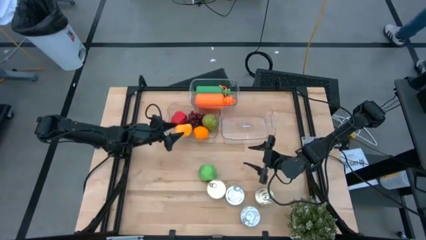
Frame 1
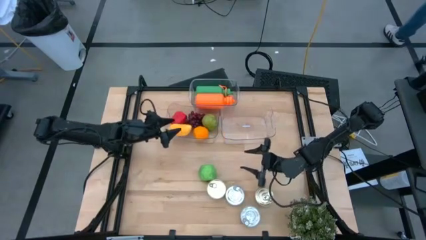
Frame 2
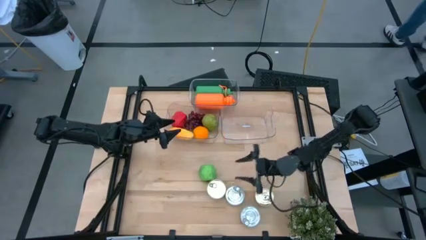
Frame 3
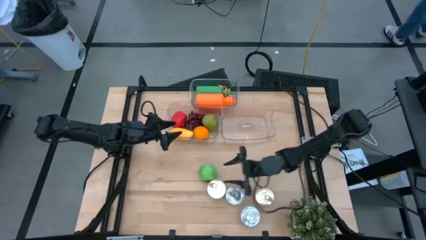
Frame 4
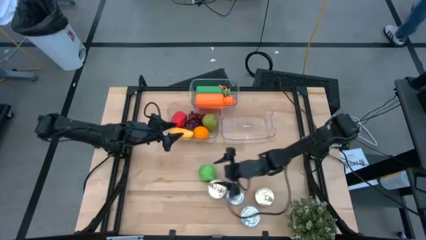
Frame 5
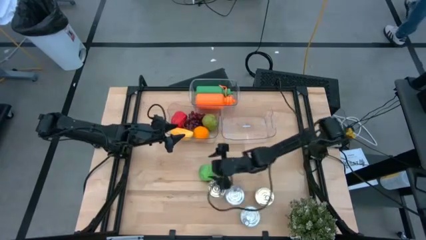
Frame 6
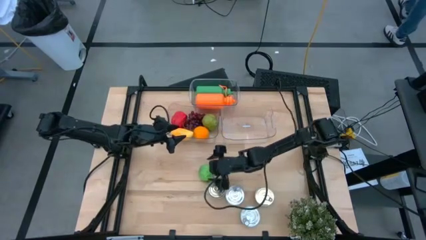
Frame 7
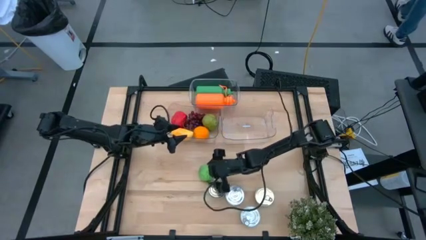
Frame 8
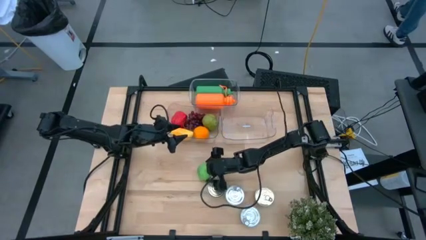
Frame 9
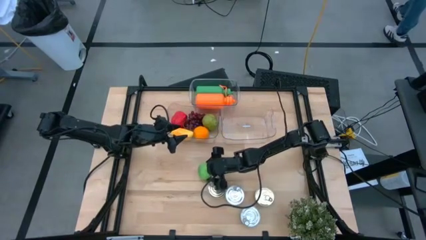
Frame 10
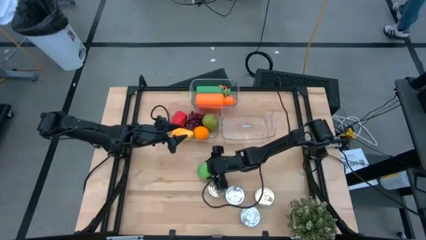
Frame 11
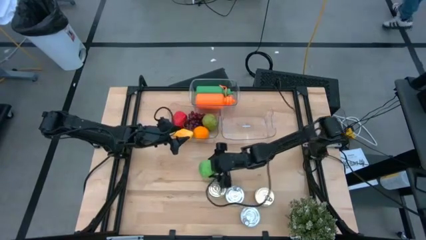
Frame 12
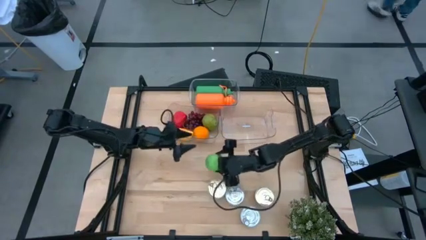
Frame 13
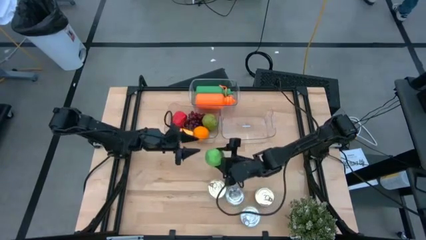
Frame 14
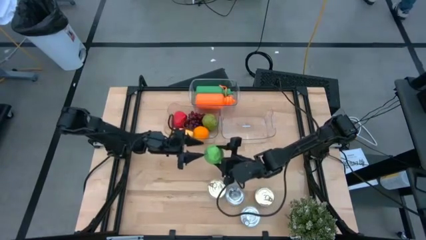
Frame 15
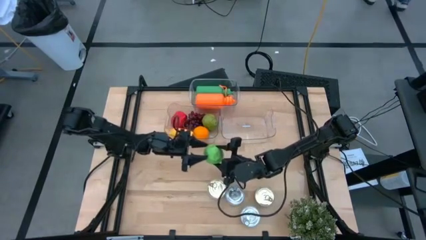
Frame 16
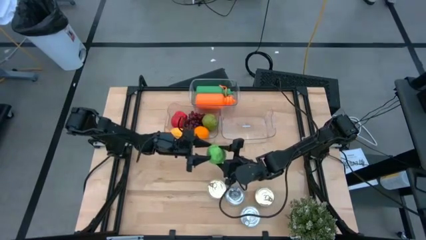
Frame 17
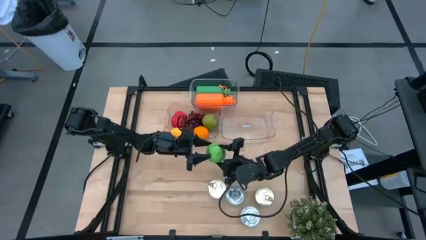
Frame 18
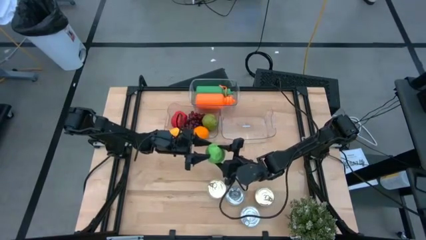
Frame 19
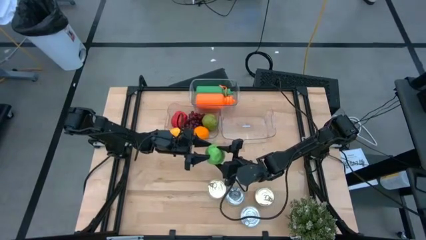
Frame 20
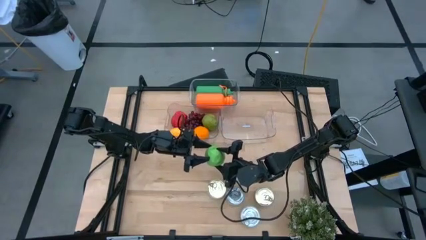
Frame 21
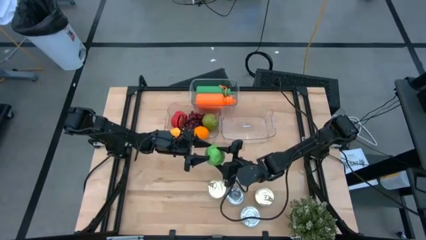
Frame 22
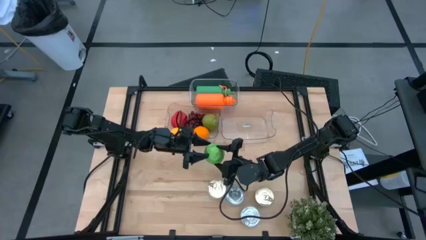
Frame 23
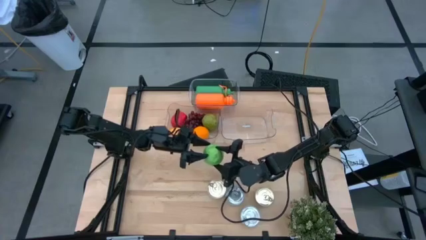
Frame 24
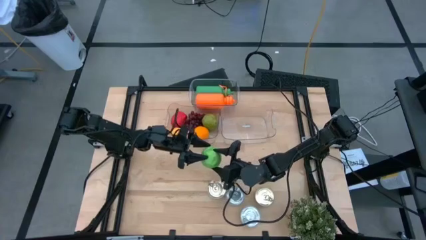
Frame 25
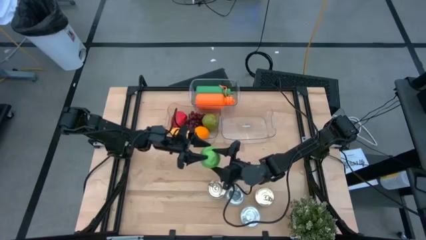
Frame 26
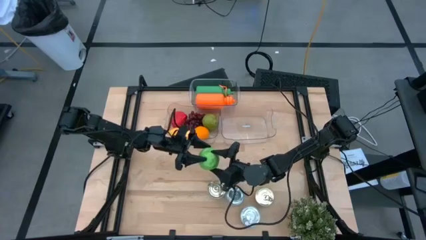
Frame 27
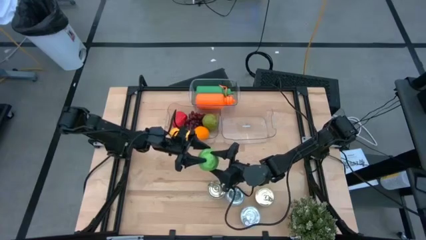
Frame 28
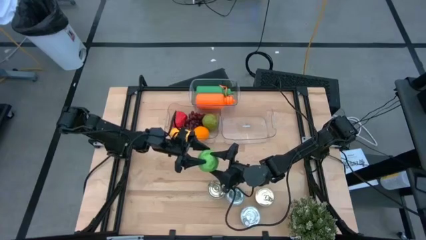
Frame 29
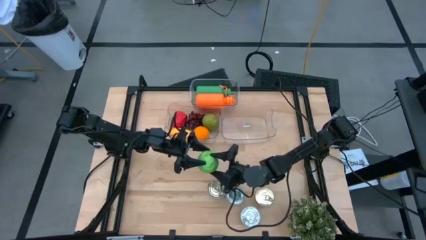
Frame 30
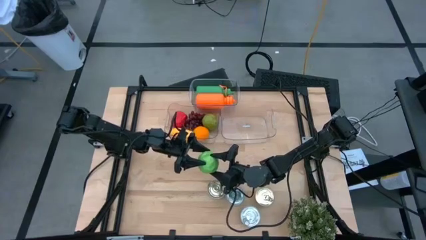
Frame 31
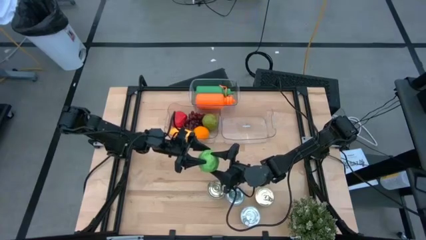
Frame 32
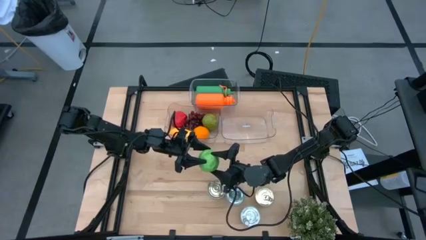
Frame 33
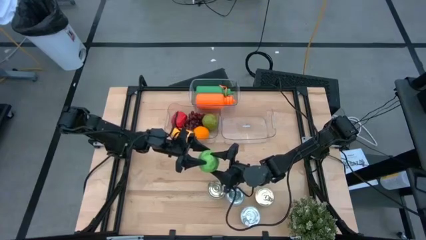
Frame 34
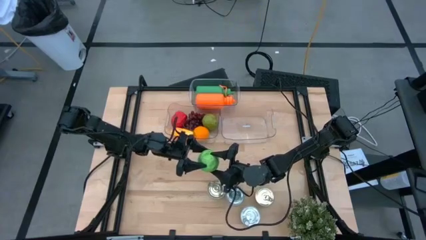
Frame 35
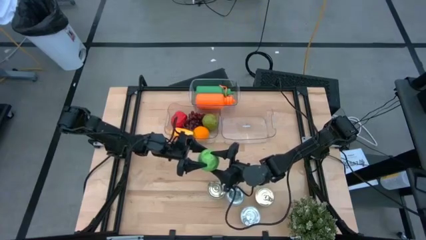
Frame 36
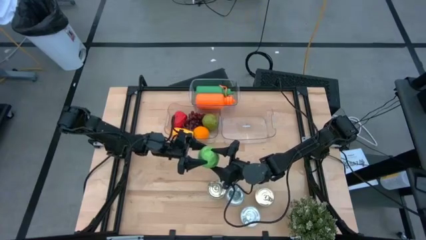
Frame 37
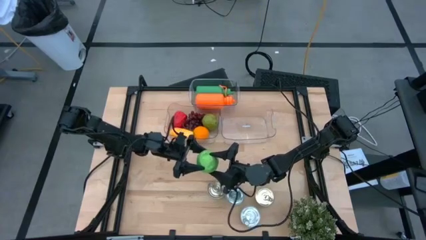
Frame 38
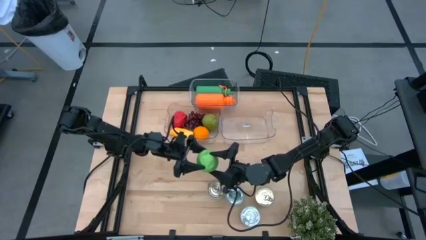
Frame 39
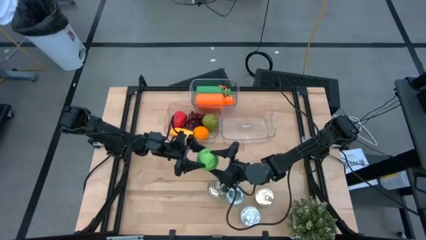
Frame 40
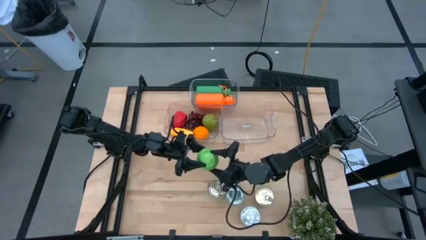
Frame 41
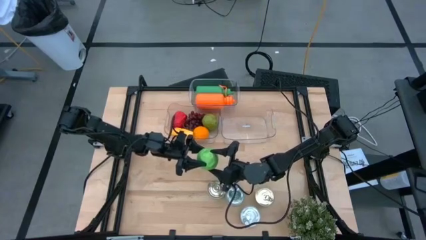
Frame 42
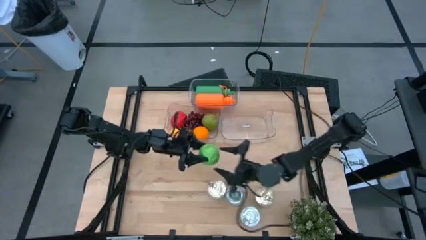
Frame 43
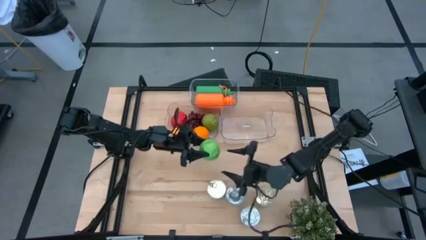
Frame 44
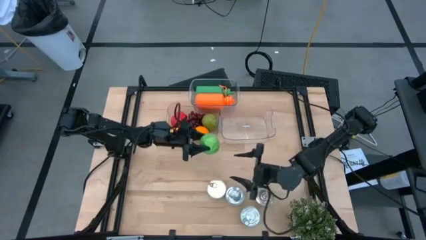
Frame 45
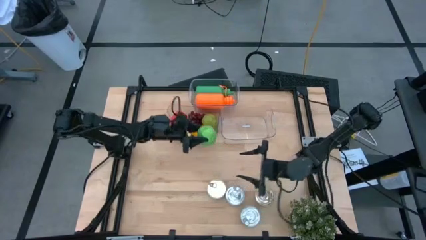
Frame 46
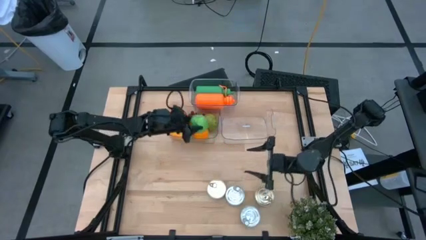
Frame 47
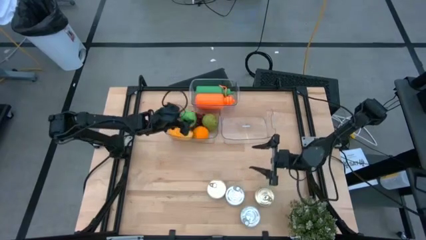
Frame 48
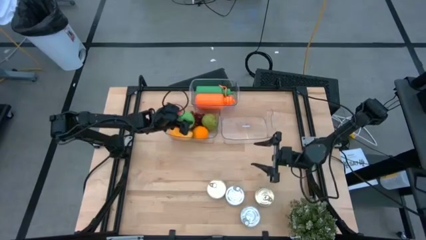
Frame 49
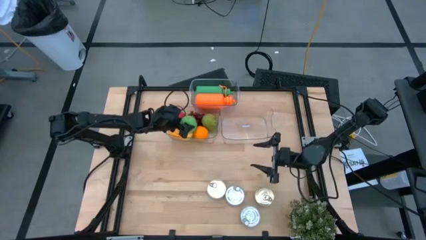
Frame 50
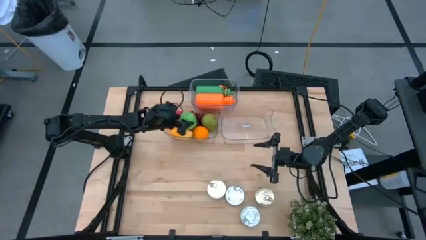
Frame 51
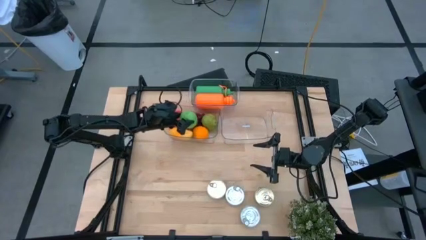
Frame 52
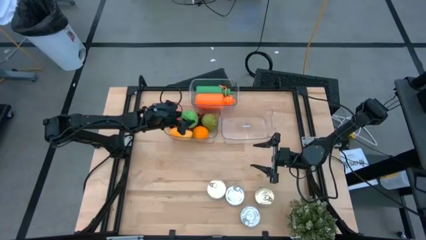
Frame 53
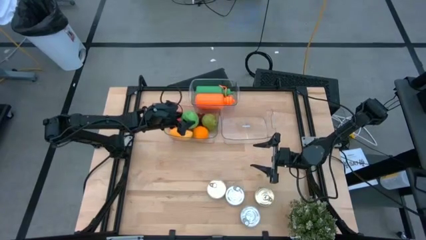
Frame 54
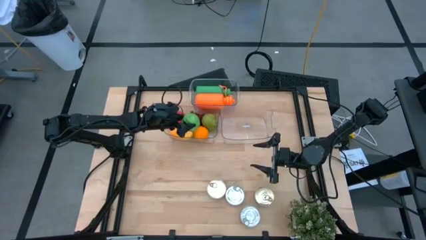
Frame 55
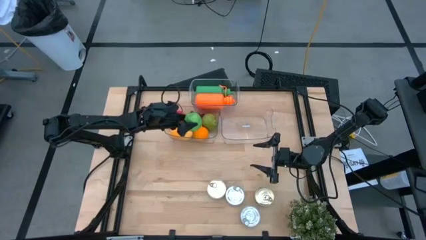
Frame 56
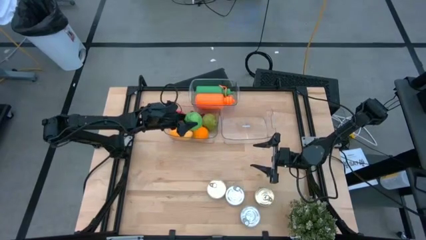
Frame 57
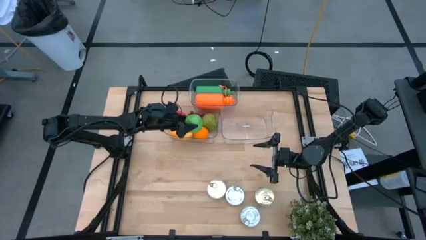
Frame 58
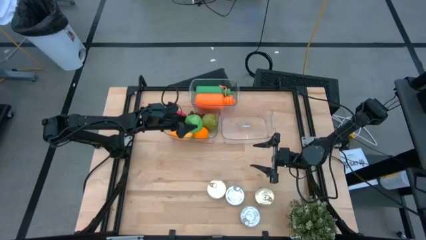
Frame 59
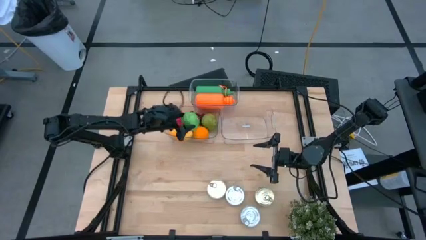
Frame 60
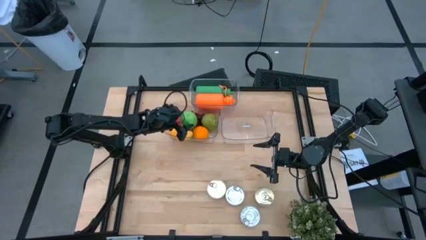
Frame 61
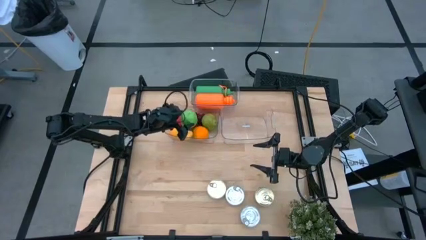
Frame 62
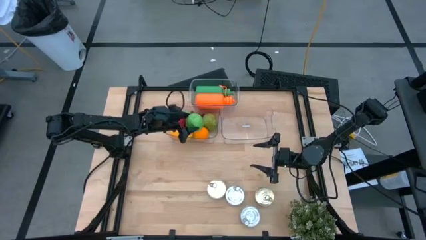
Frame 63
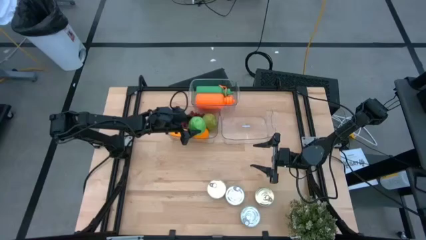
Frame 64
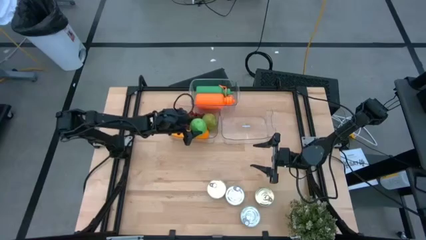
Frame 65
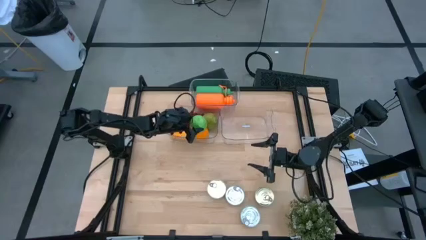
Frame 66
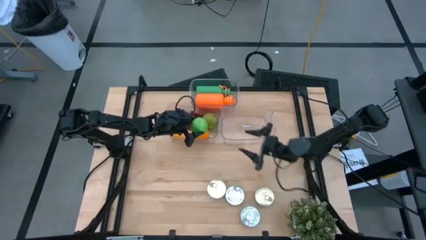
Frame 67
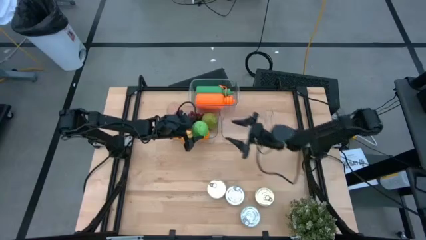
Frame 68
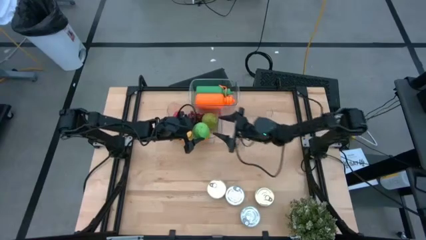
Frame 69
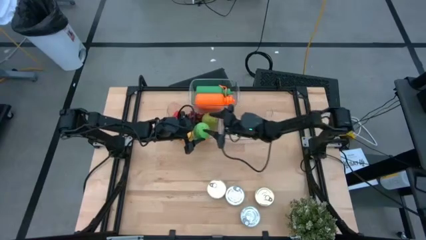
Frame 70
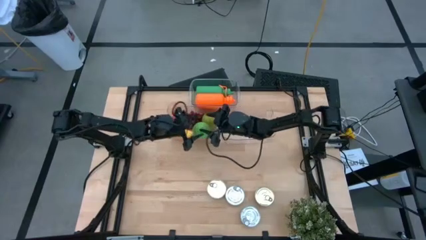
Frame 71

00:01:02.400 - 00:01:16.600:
Task: Pick & Place Food Item
Put the green apple into the bottom left transparent bin

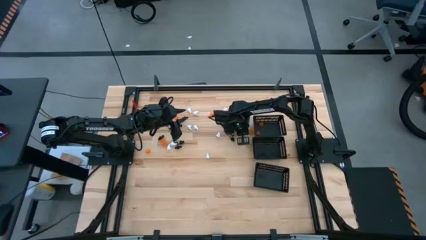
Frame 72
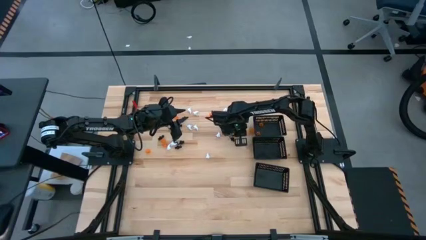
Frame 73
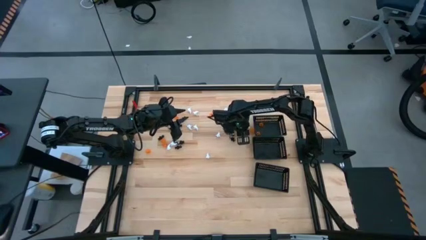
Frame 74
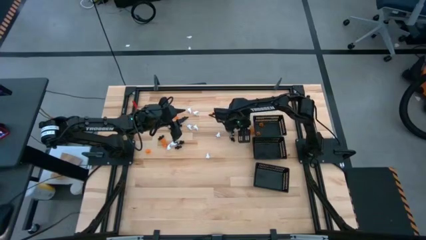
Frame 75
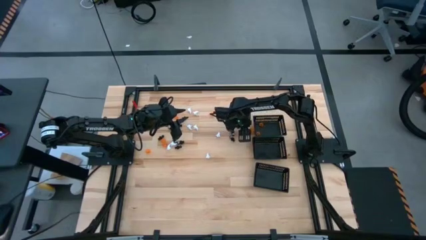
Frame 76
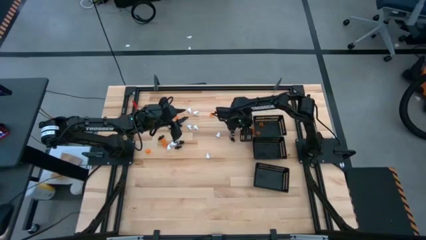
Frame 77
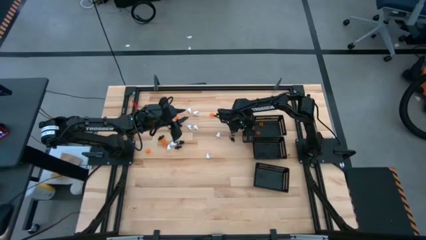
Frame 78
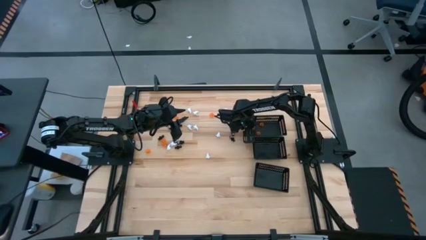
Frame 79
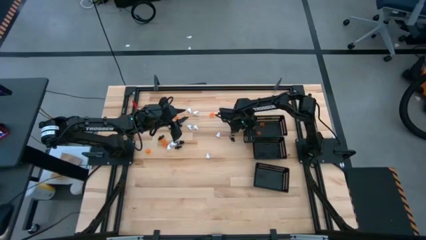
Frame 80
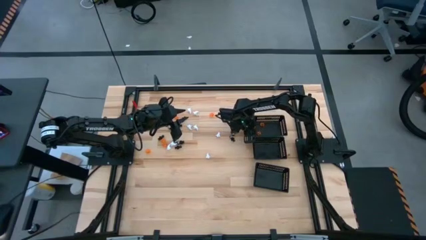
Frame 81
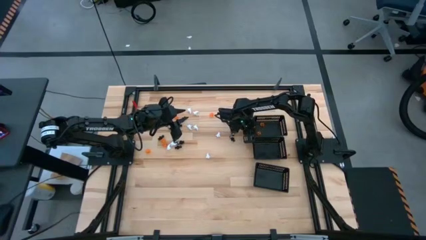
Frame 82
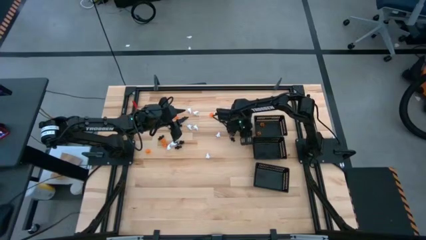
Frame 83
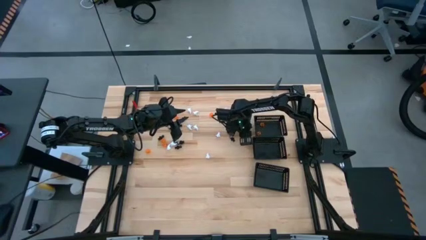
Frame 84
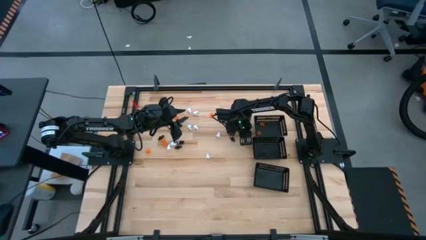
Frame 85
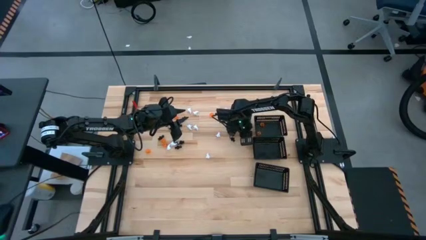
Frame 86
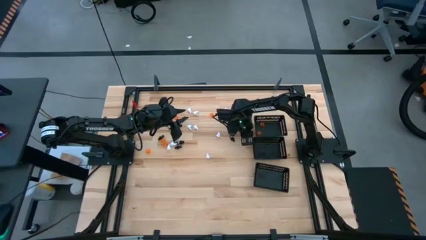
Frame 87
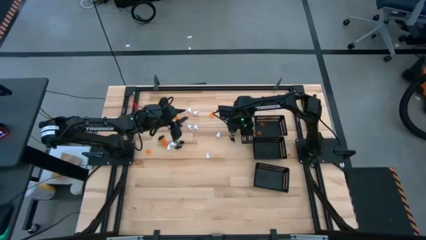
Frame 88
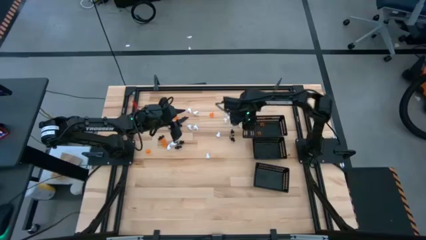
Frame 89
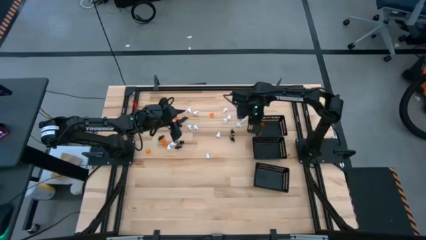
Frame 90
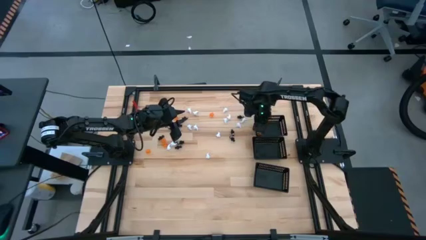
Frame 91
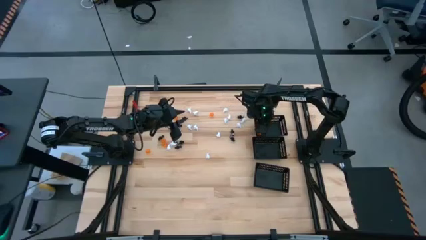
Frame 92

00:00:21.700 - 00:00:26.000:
Task: Sort Halloween decoration
Put the orange pumpkin toy into the top black bin
